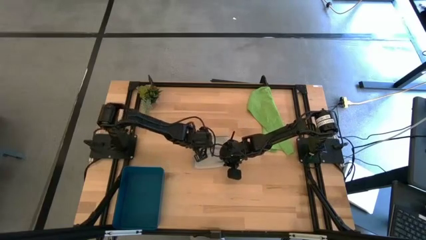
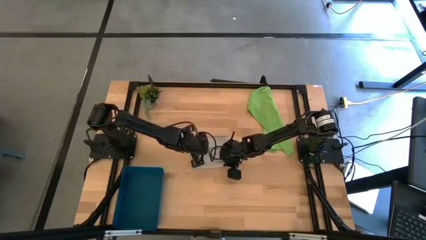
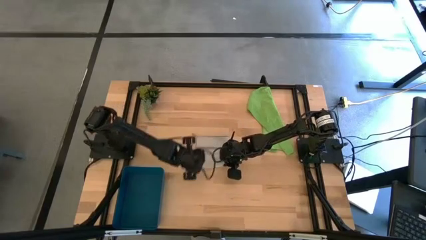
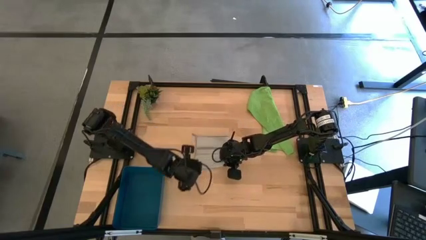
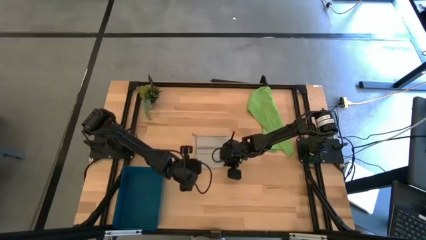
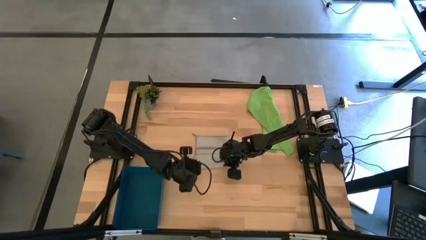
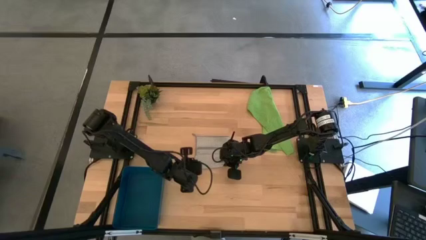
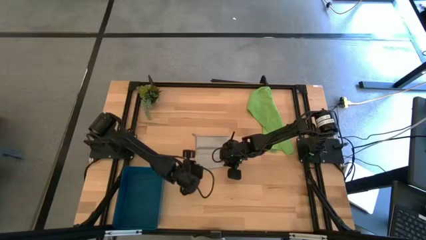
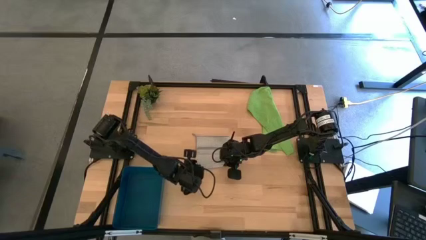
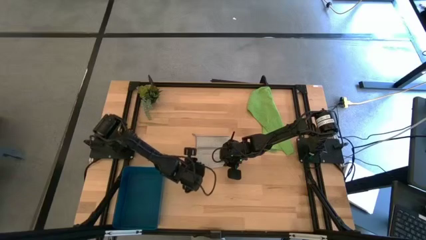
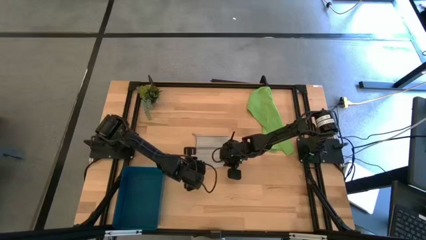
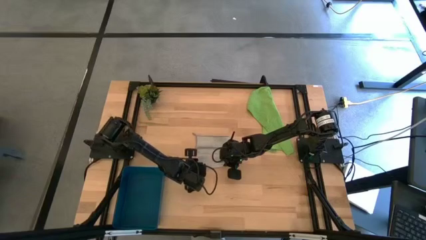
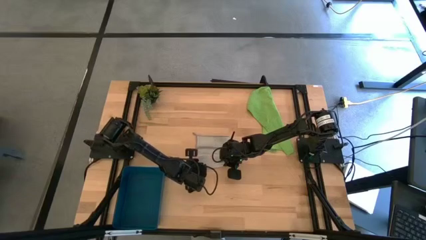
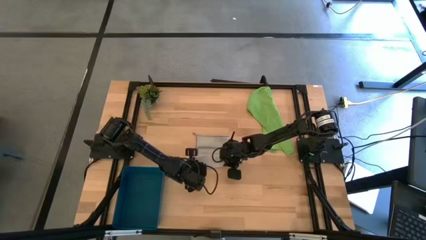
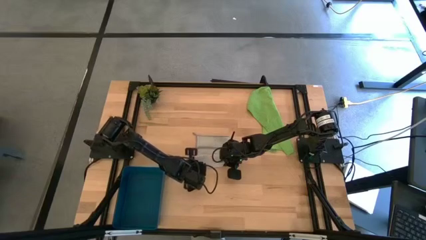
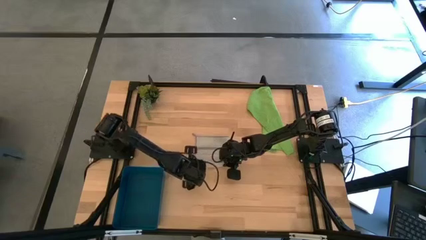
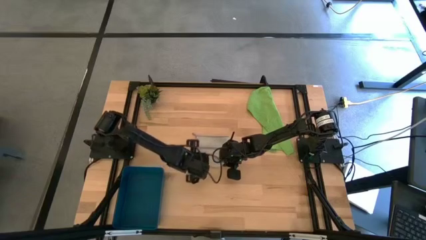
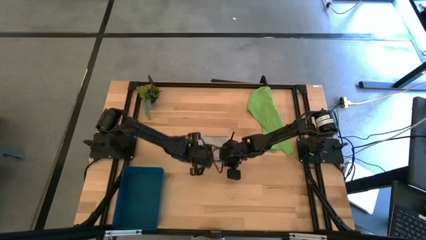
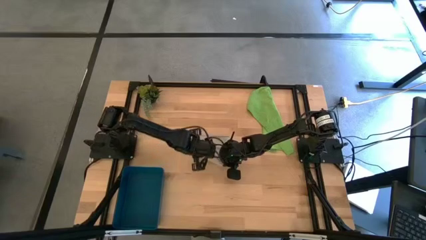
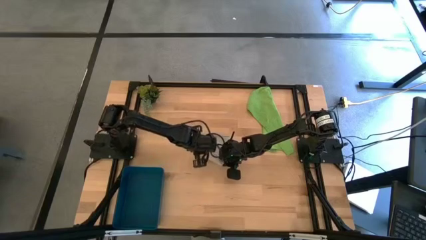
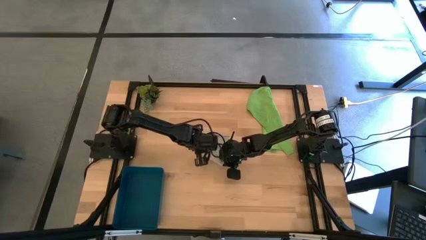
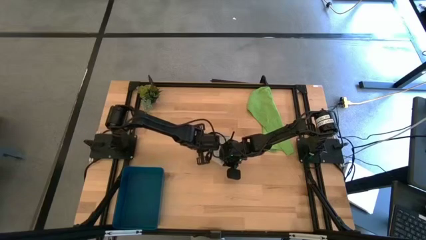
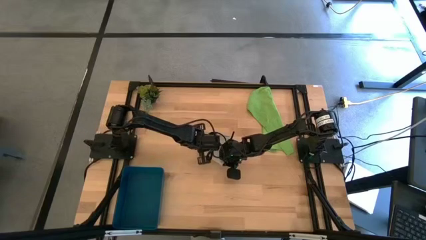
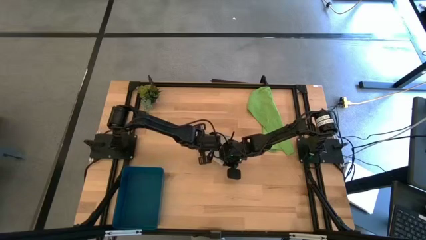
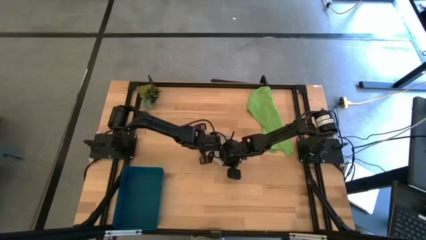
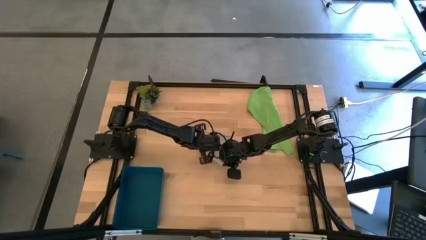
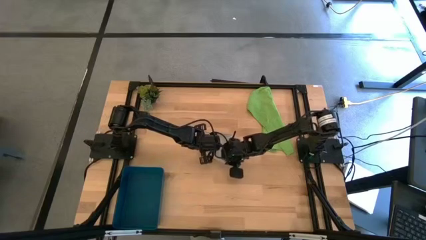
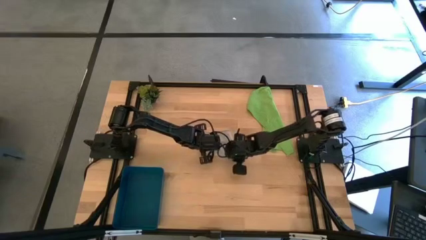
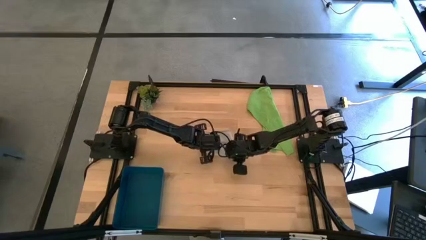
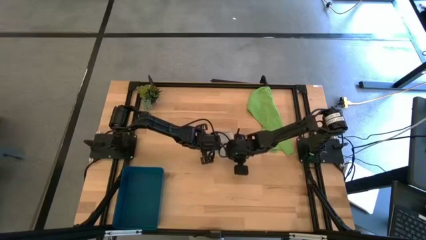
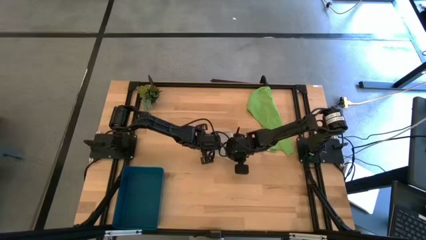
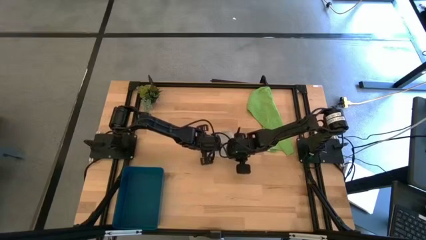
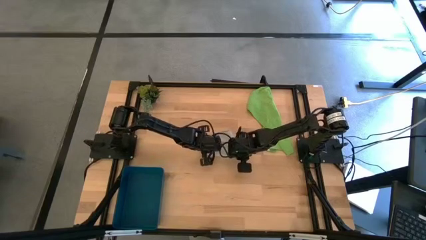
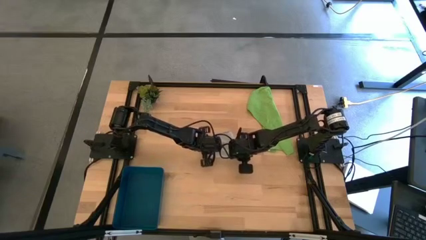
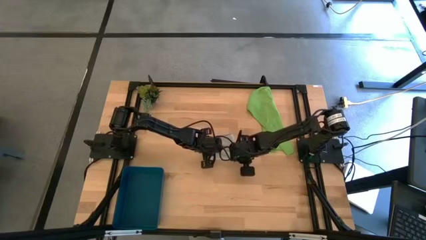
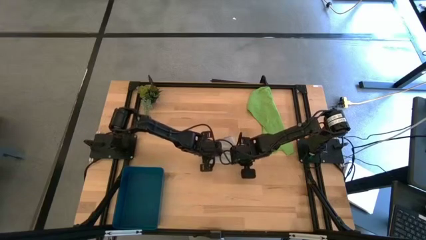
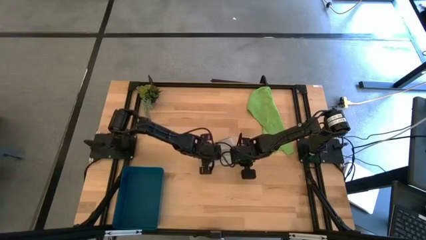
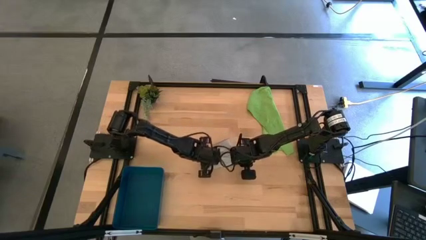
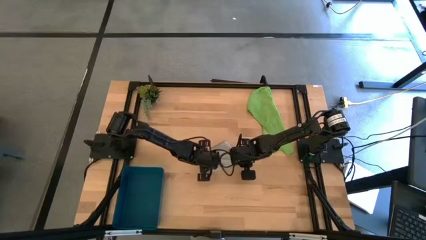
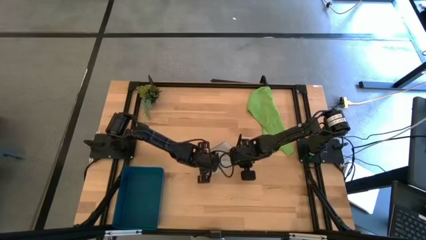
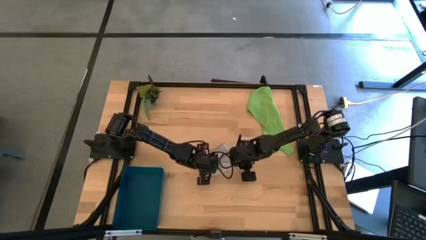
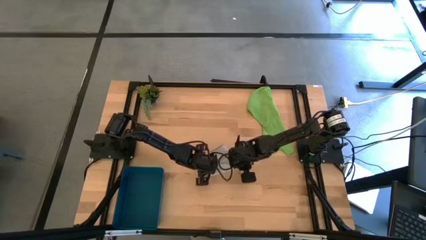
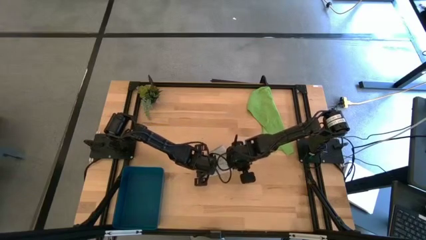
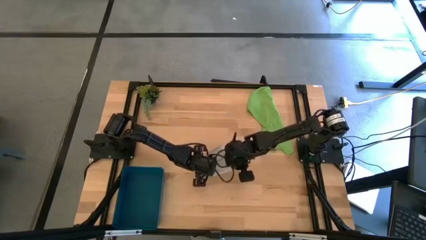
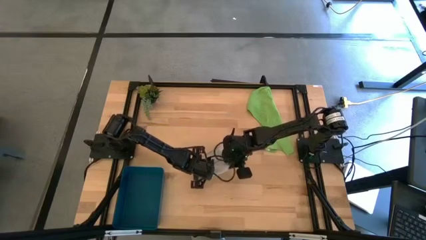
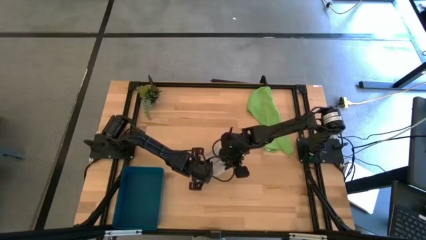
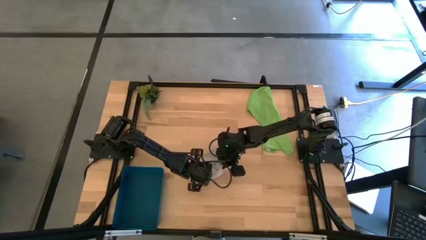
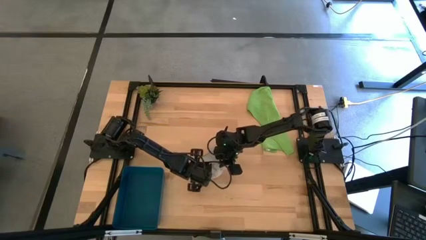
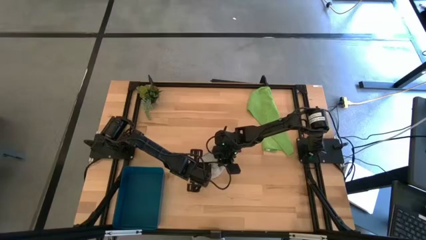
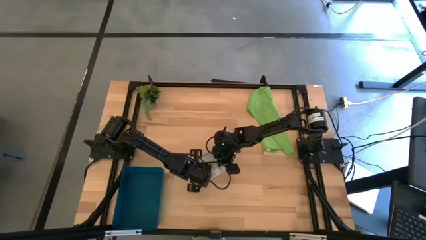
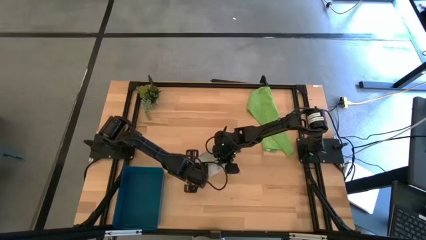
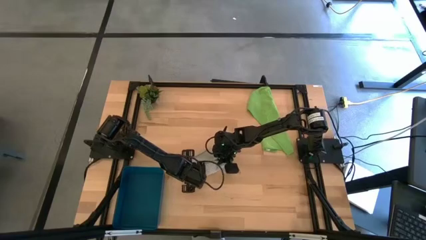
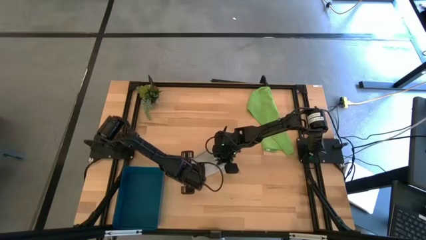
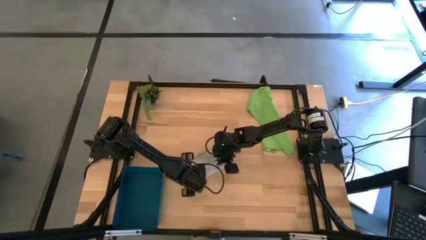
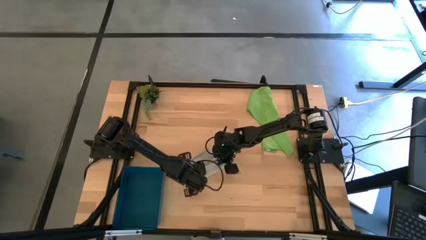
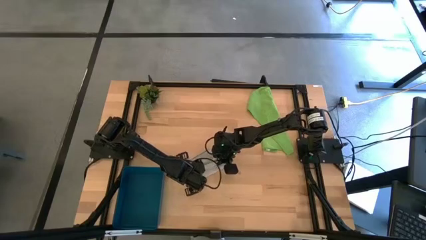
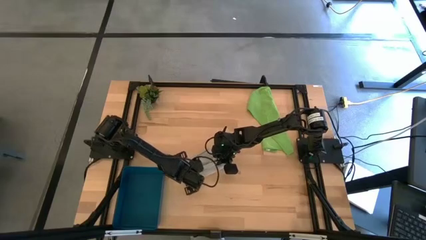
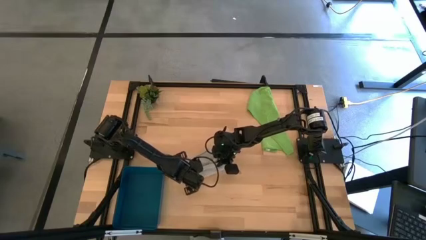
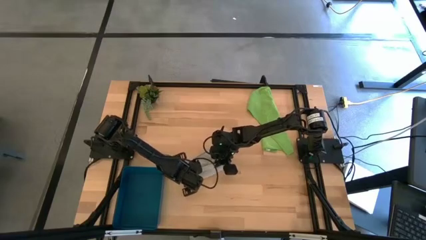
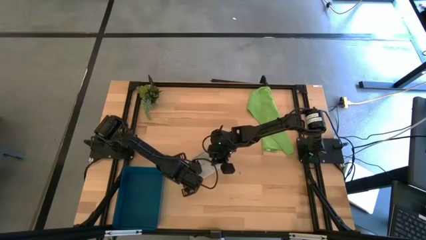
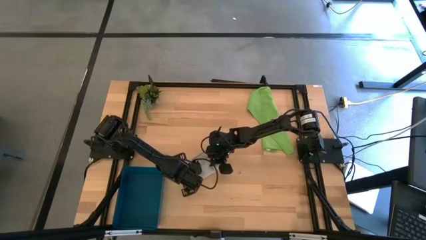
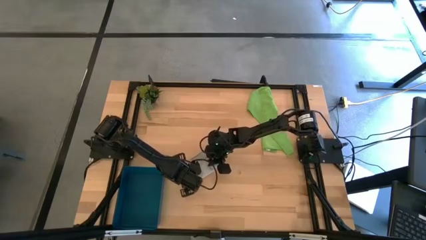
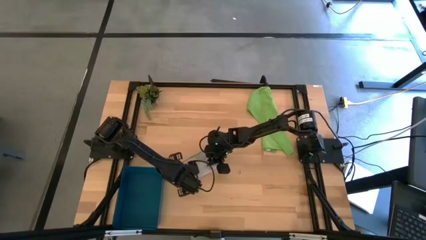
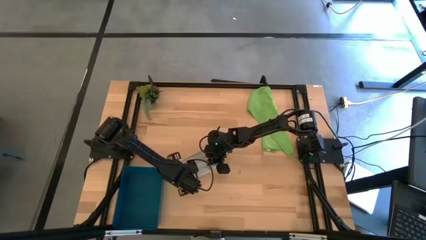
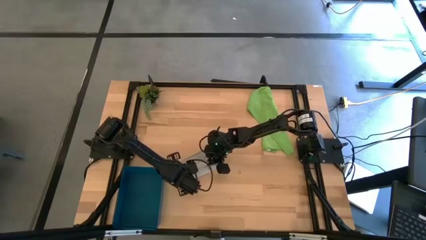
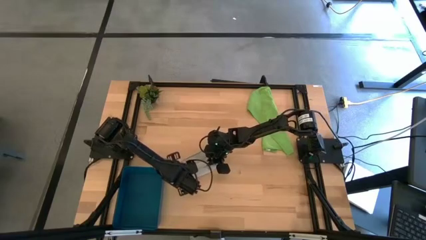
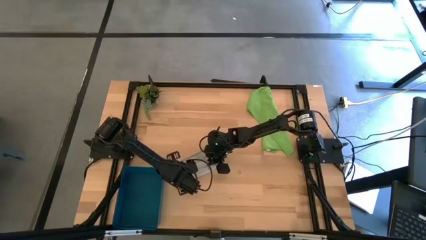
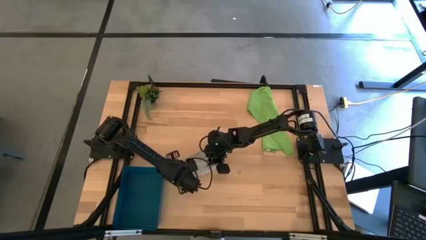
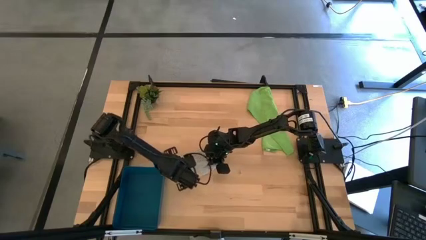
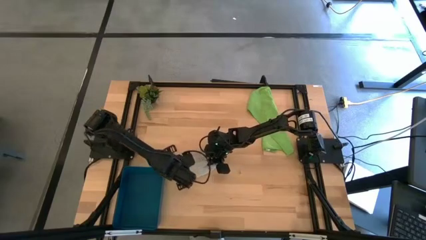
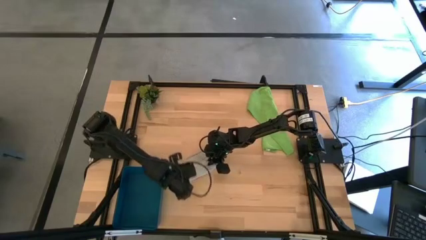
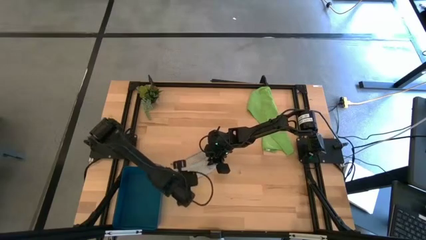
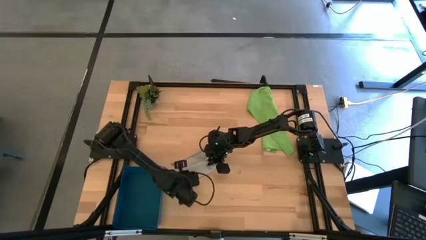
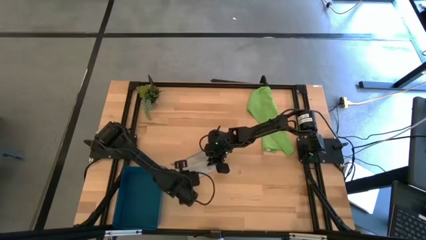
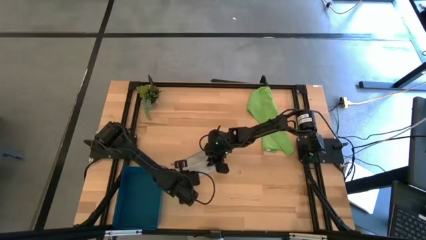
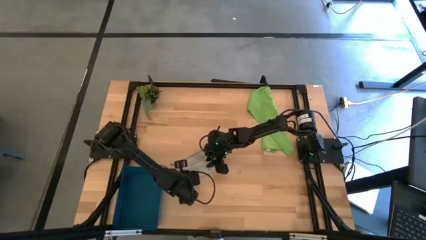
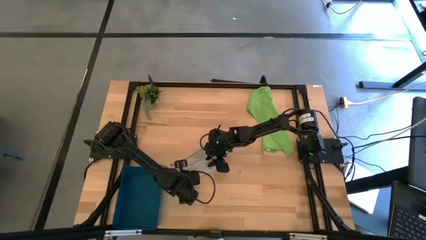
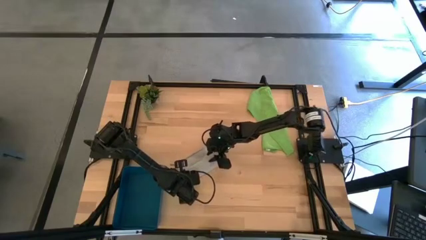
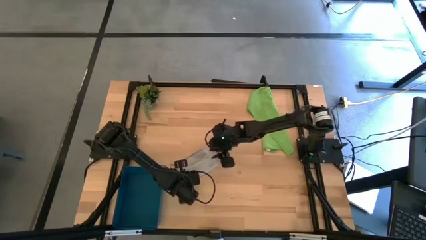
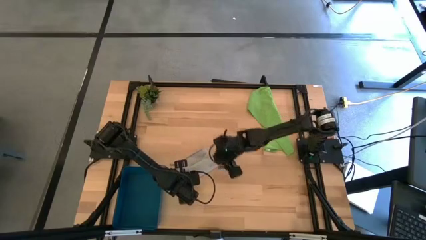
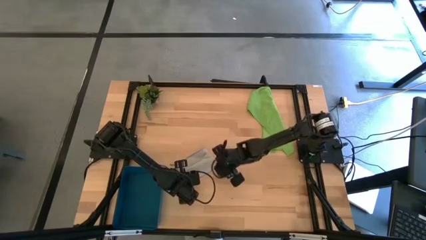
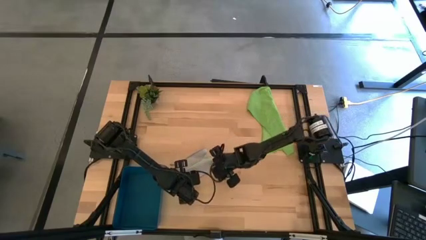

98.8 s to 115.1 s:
Task: Roll microfiber towels into tight, uniform cylinder then place into a basket
Roll the gray towel
